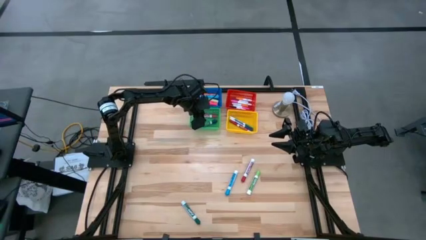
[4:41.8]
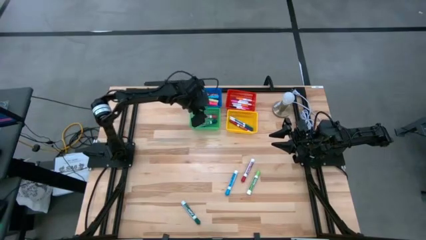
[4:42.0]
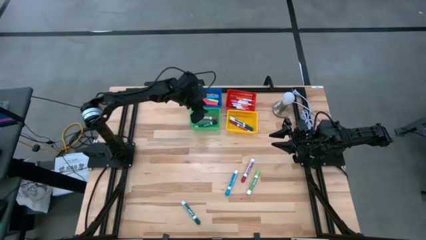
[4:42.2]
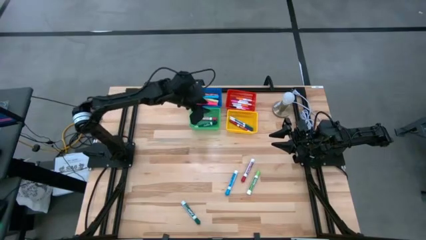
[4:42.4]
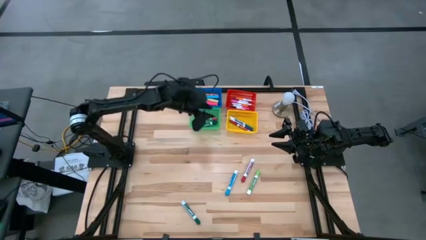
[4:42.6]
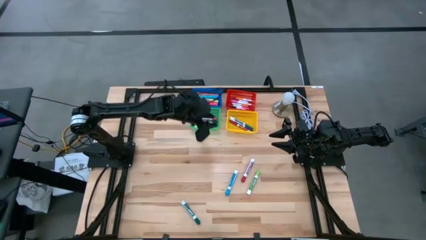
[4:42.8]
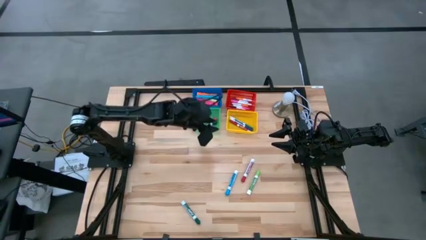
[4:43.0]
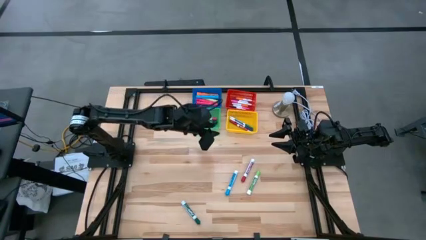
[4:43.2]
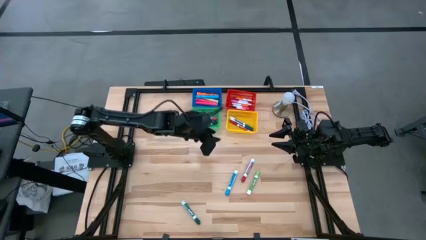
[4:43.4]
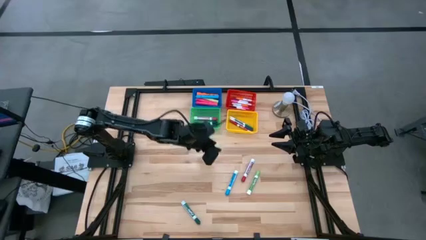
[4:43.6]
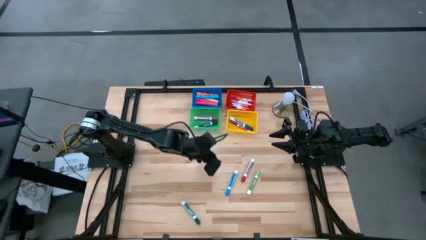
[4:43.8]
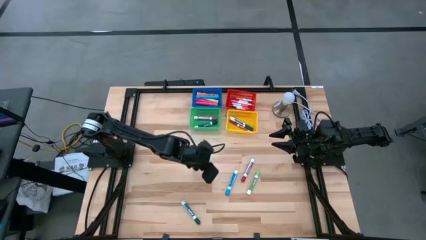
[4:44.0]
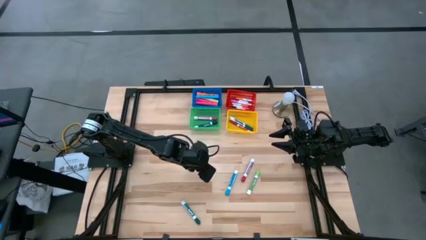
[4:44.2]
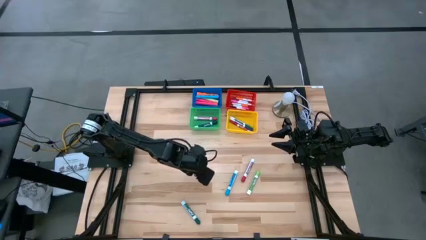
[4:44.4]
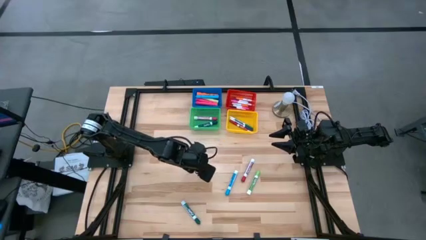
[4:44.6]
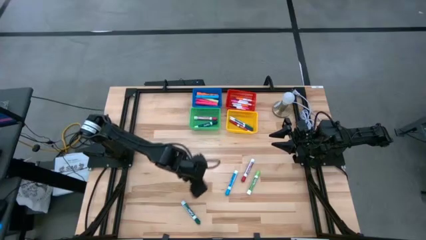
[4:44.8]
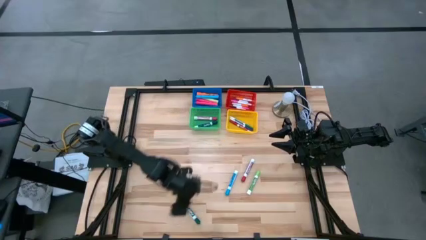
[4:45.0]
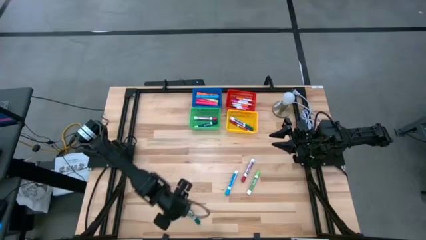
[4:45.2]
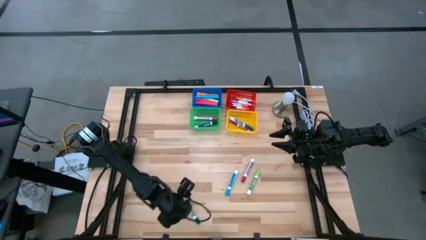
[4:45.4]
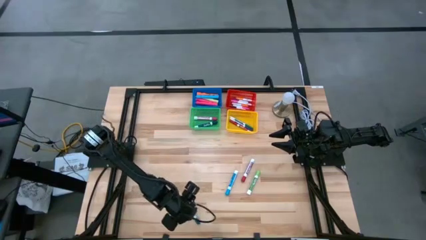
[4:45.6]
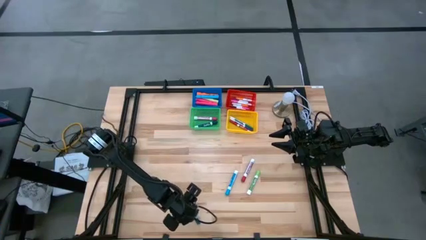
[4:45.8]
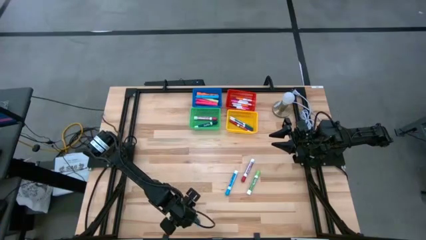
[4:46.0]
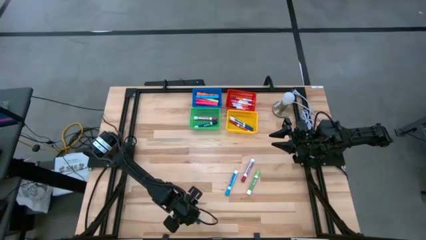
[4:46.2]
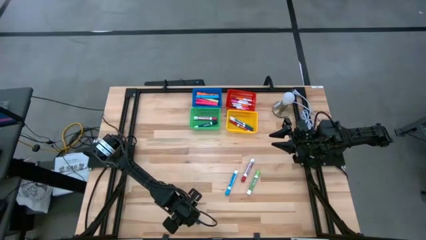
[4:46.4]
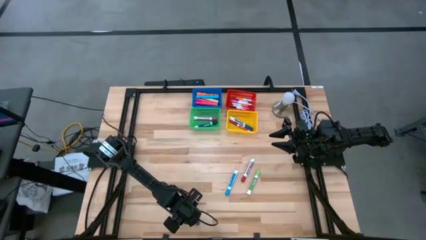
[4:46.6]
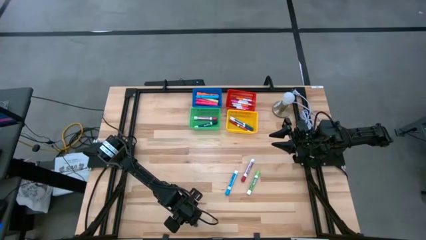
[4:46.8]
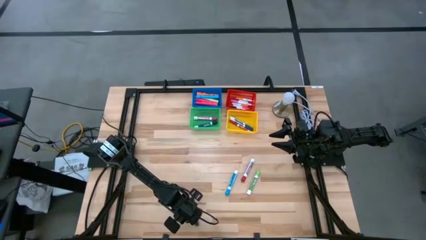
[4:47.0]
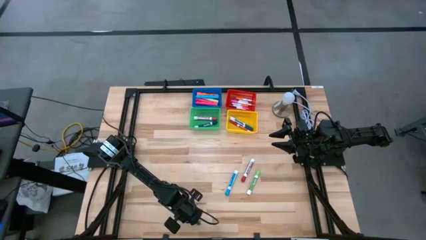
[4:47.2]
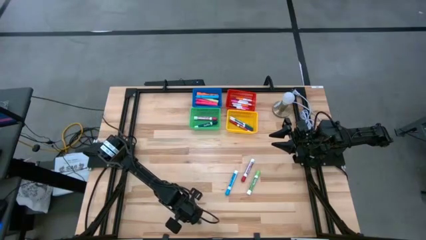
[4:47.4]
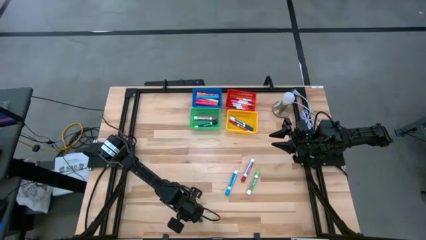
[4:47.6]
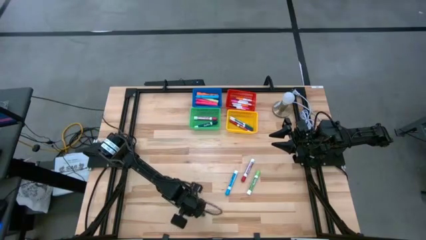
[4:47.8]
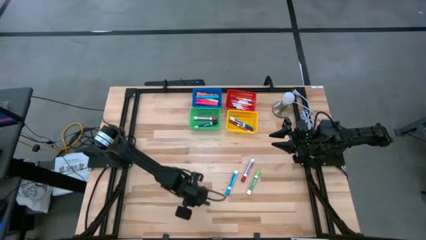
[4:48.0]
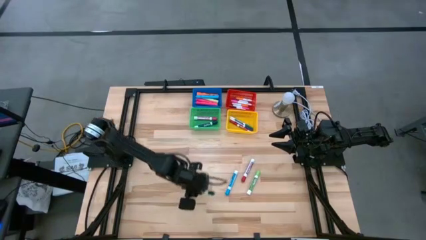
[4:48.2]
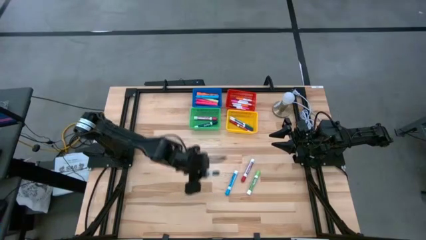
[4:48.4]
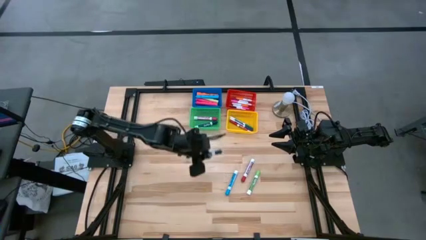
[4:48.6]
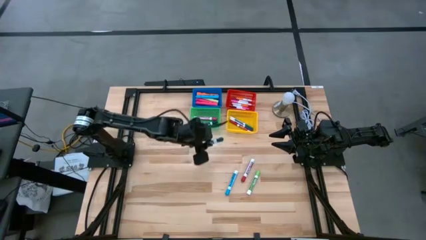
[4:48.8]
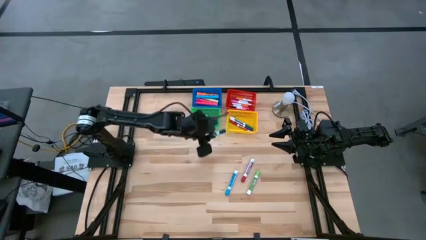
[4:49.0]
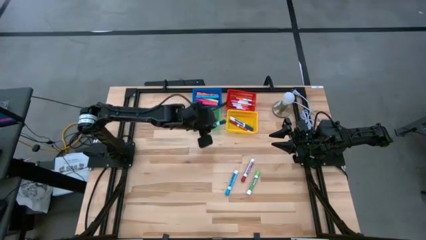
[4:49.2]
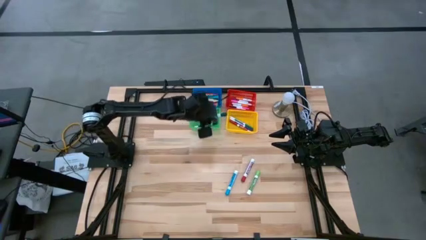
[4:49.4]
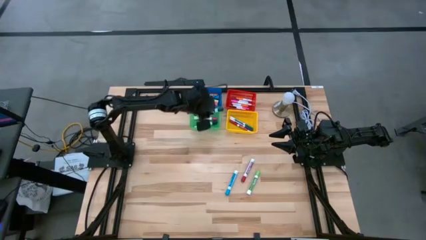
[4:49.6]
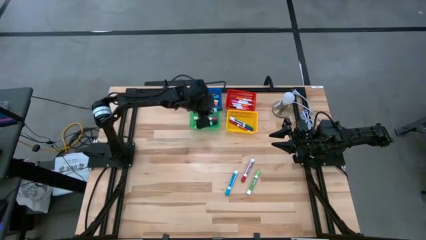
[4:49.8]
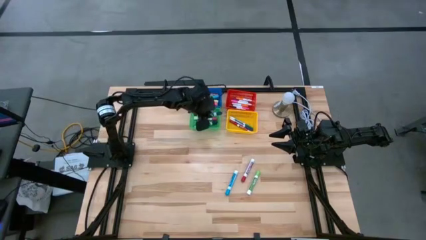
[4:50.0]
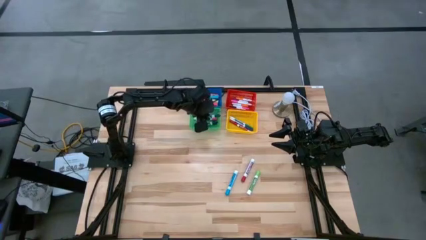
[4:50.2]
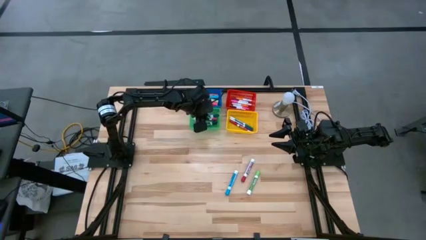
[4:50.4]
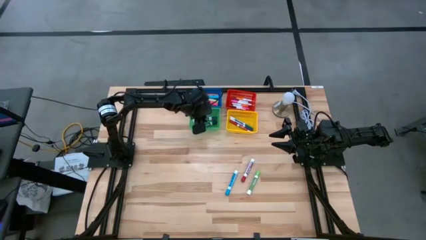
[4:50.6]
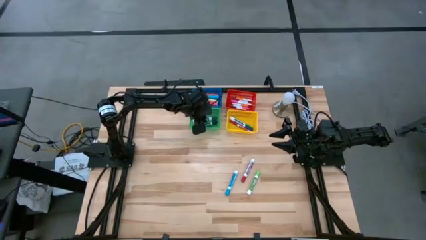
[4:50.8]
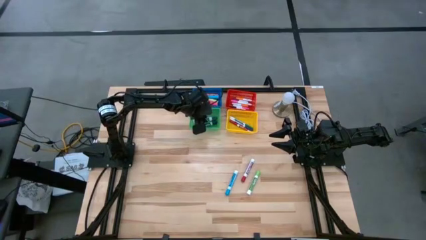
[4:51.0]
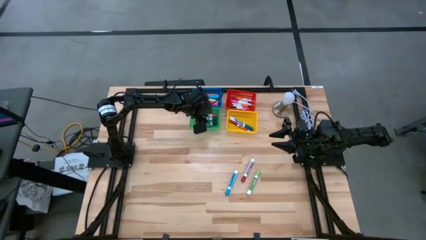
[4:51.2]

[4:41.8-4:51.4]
Task: Pick & Place Markers
Put the large dark green marker into the green basket
